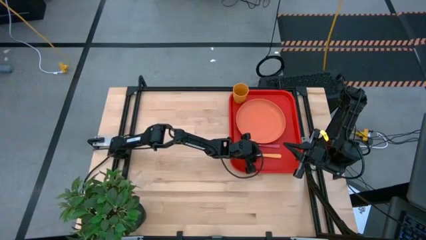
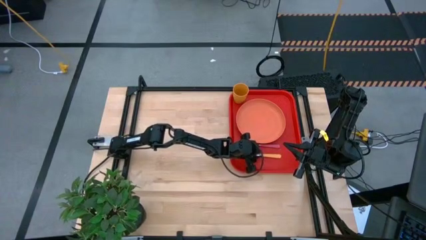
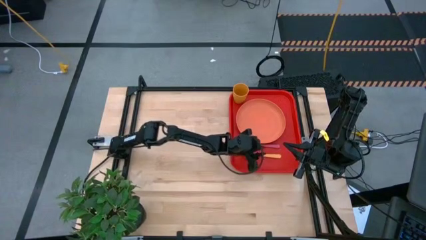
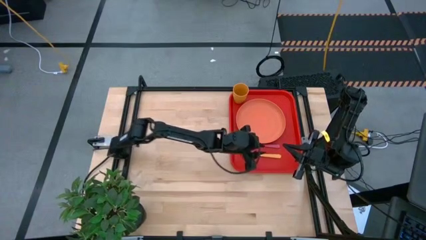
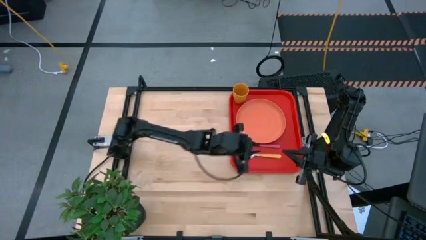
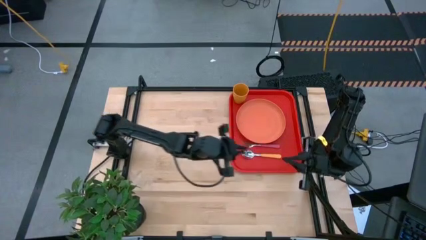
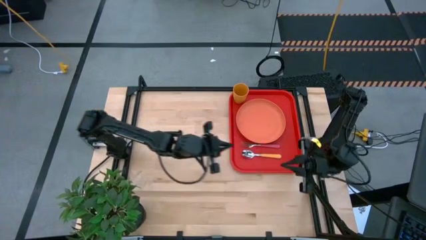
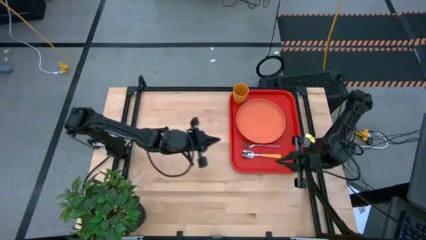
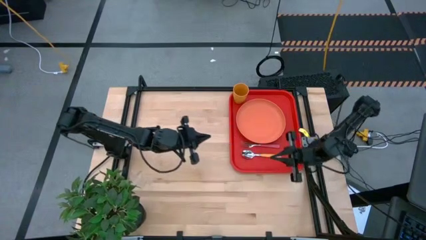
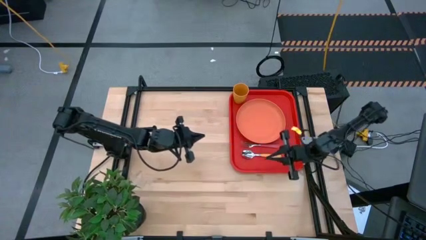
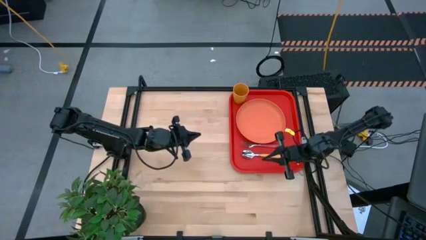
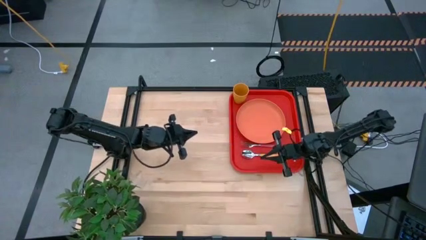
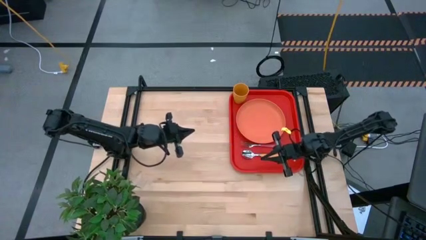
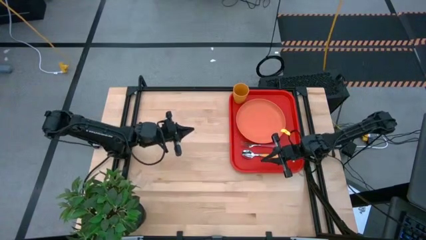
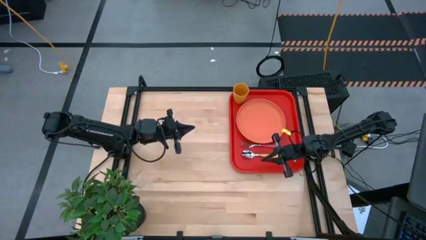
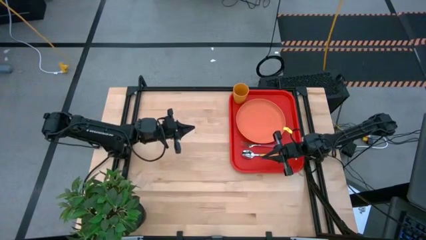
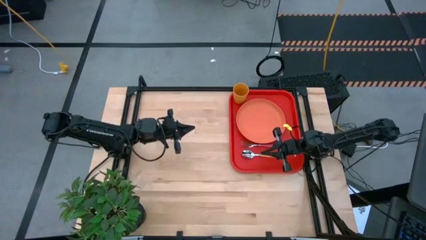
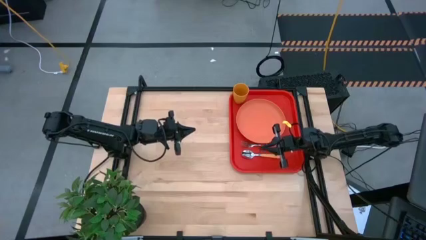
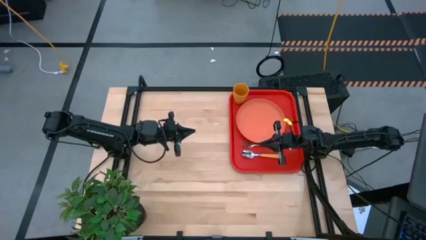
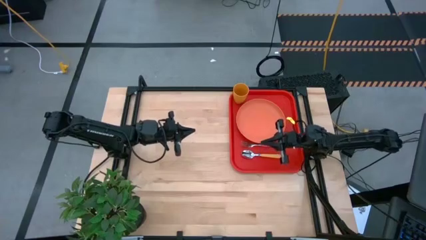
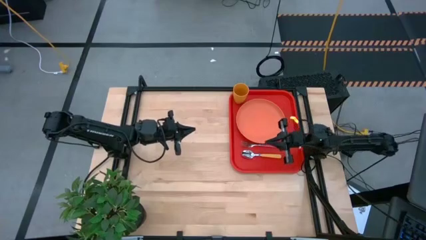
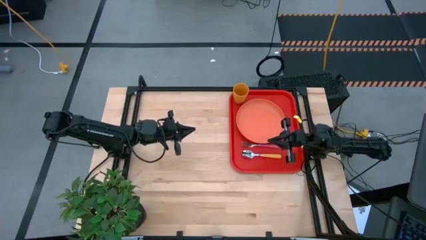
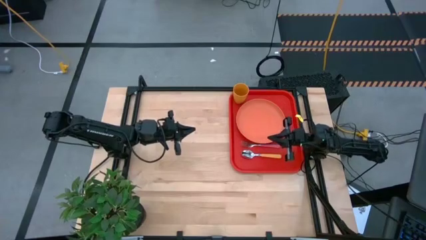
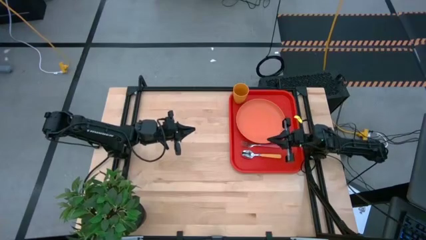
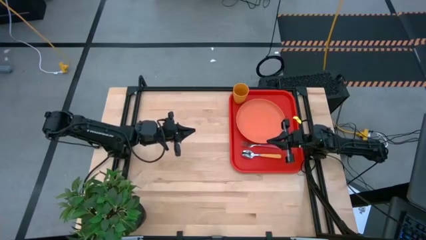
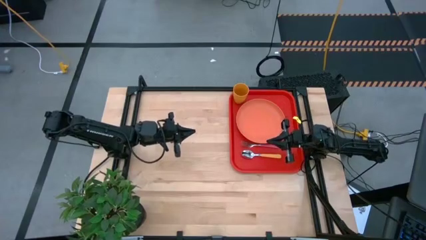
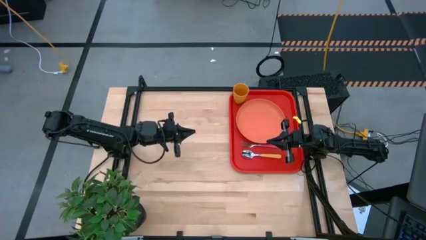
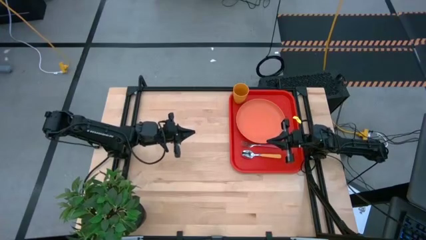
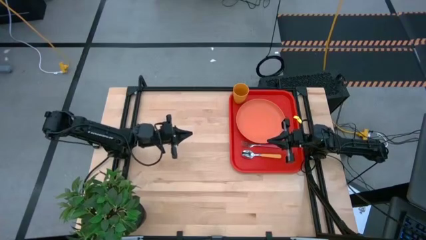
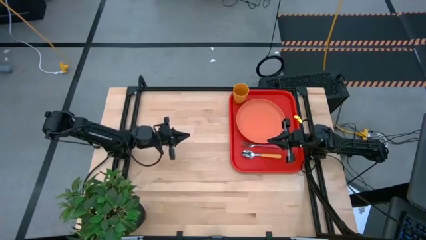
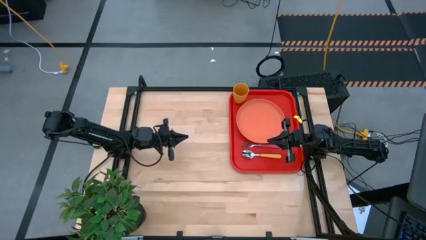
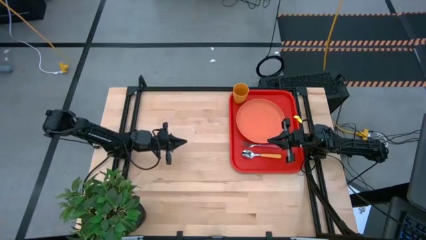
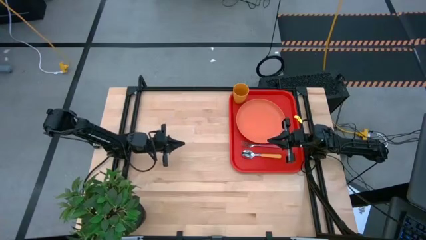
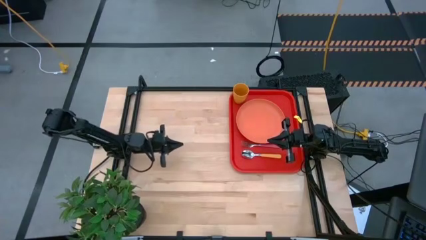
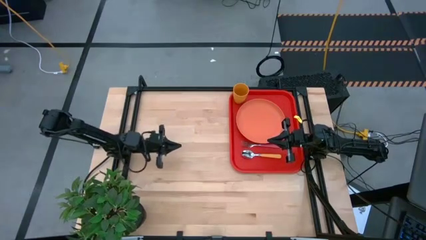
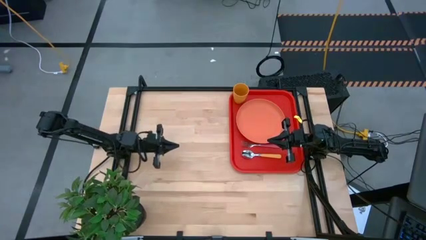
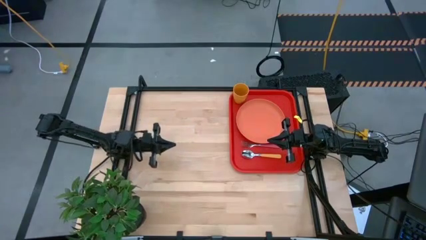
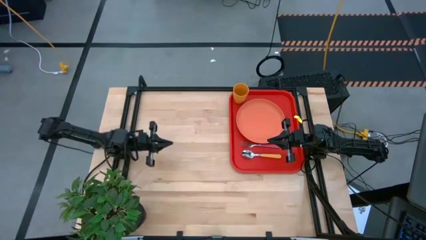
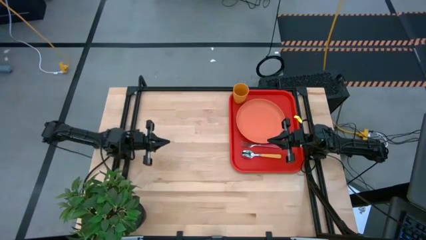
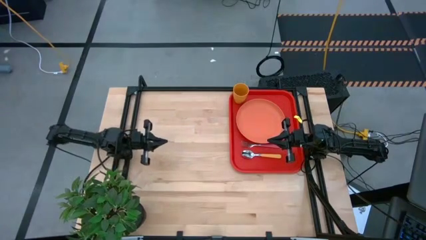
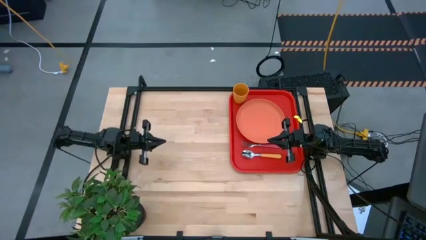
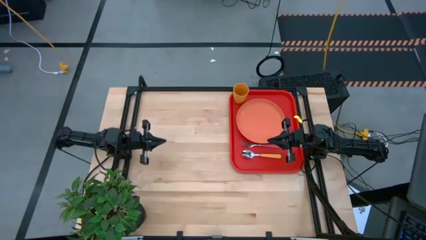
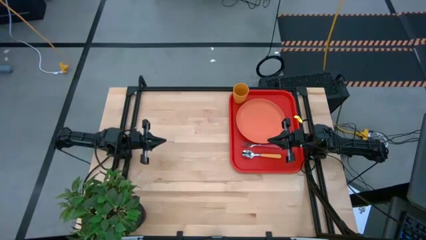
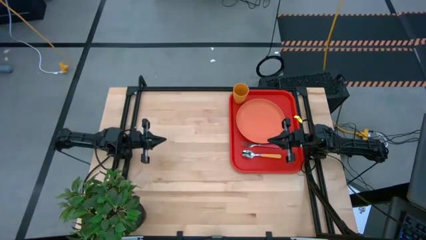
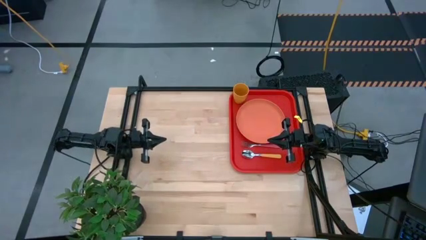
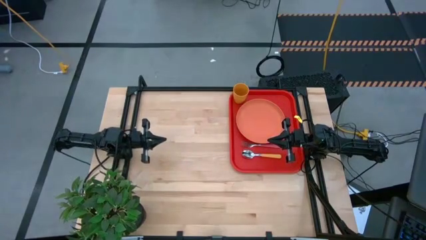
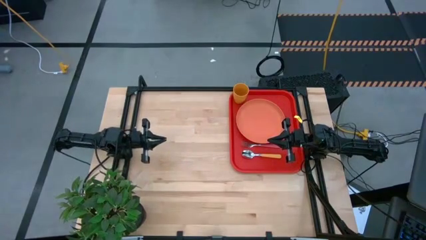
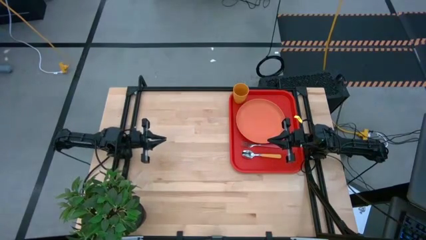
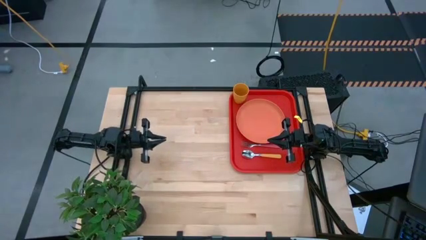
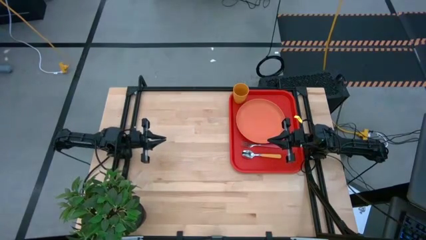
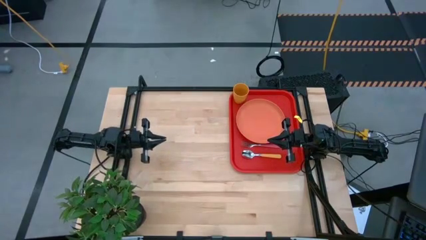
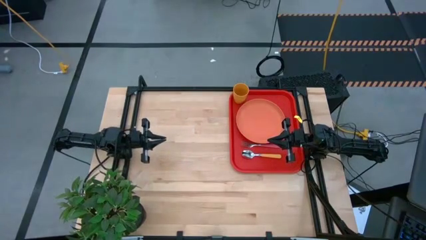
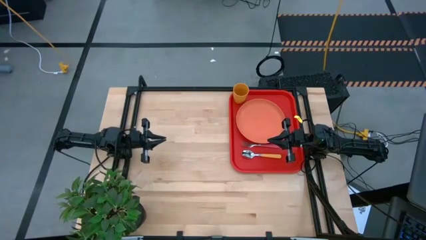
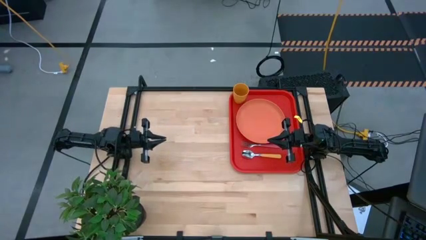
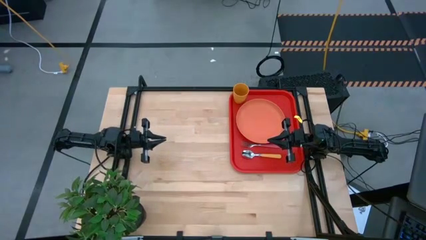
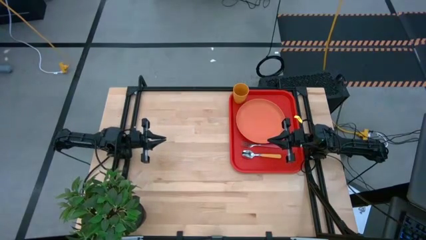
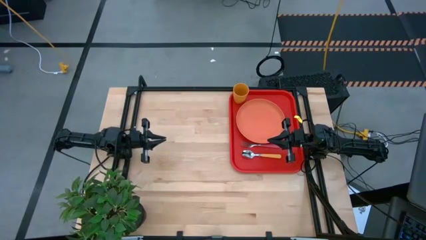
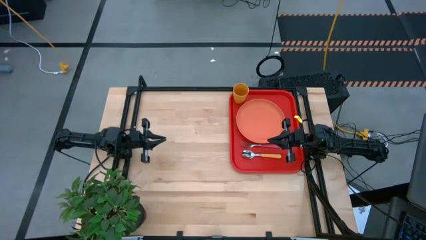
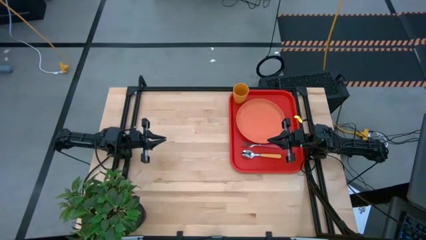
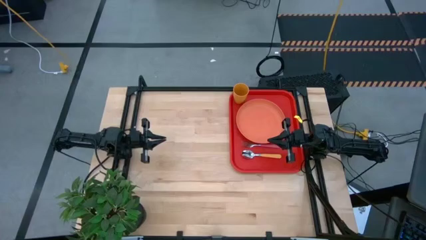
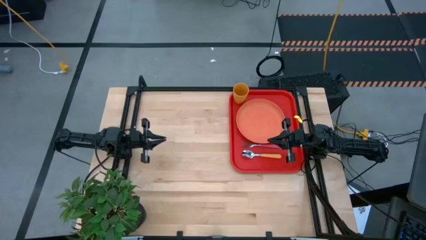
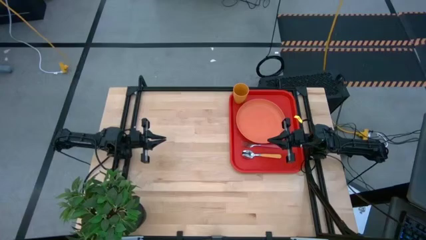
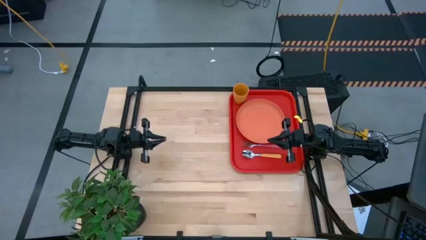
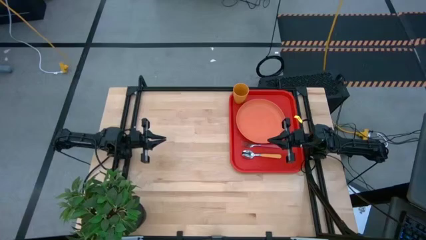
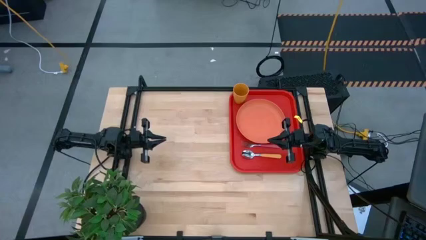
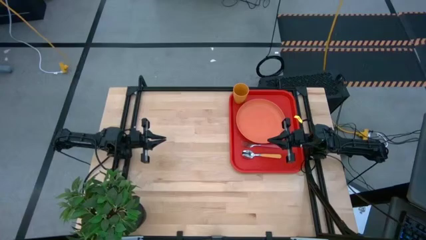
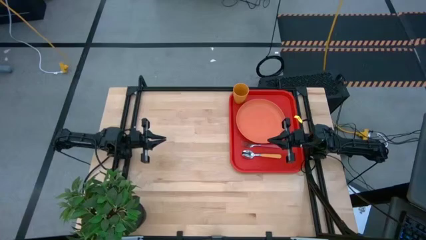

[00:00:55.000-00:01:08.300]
Task: Pick and place plate/cup/fork/spoon on tray
Return to Home Position

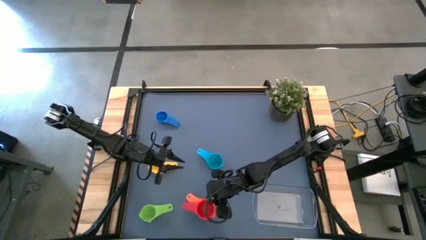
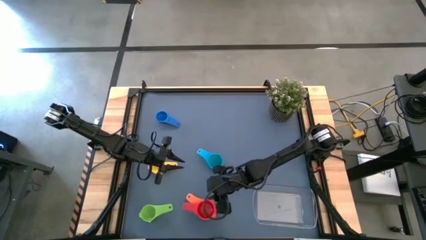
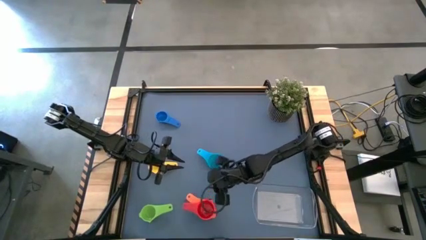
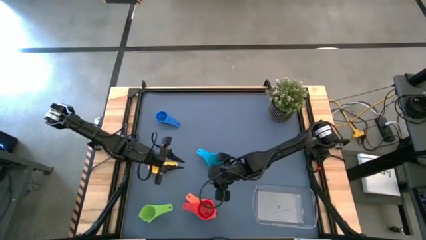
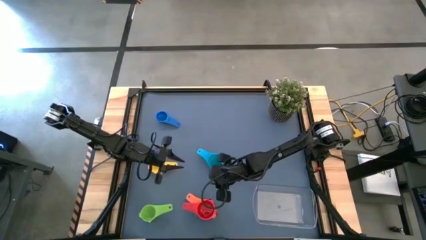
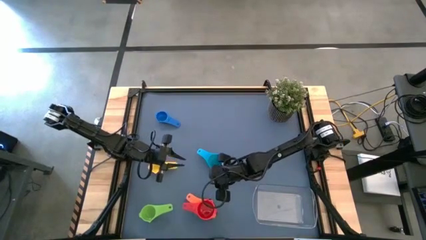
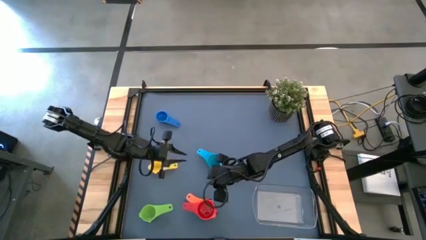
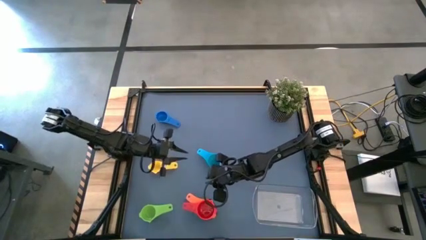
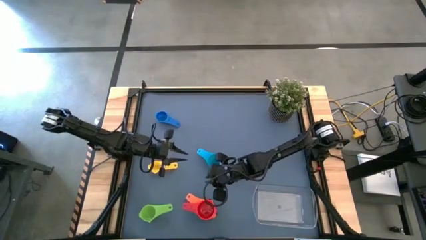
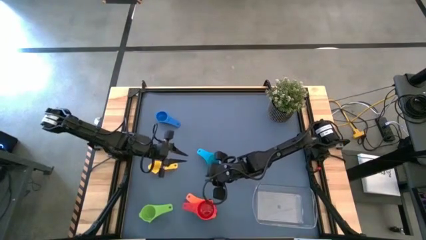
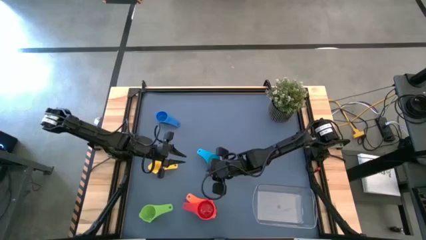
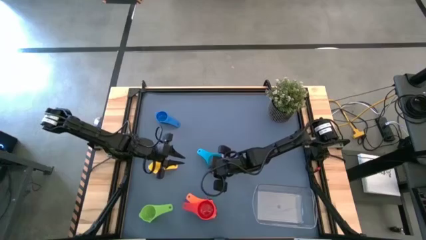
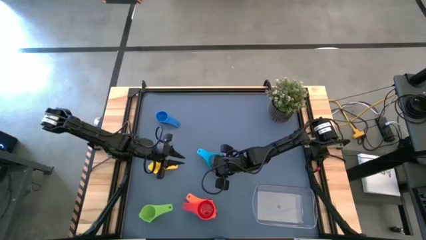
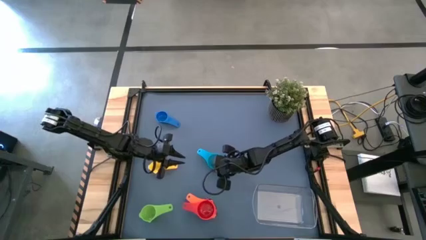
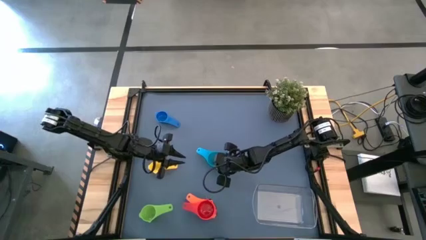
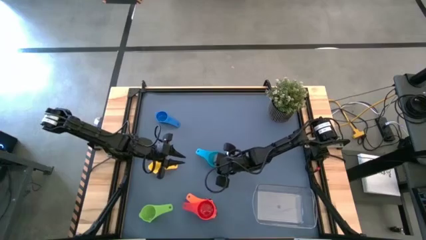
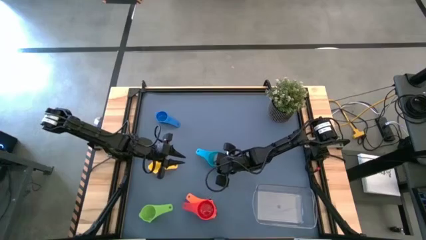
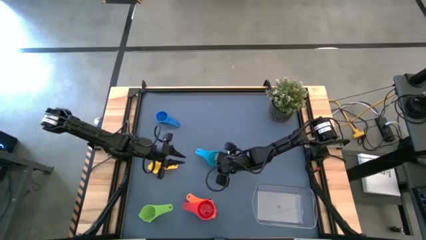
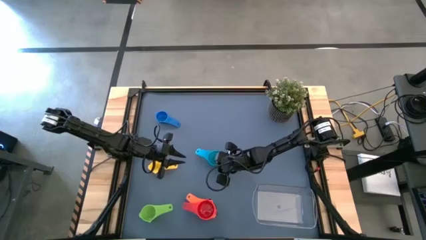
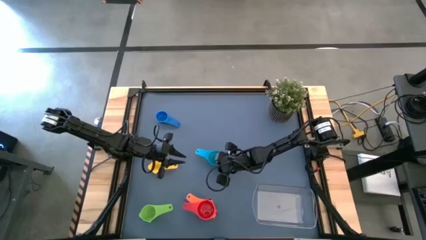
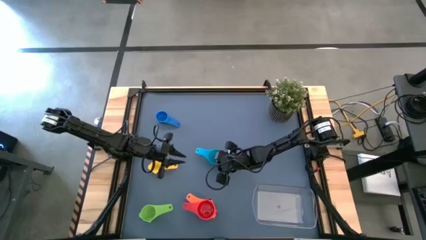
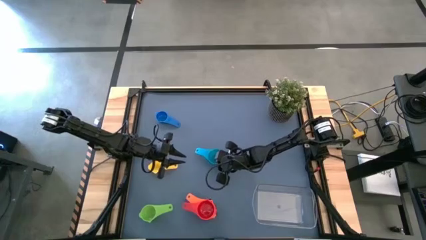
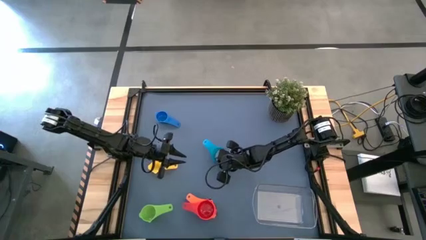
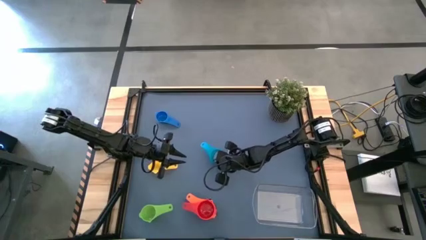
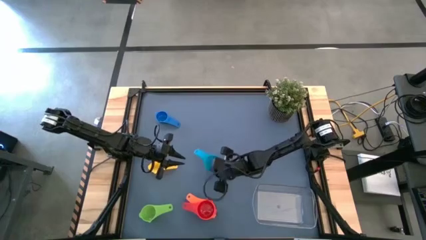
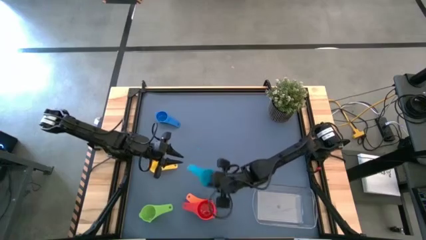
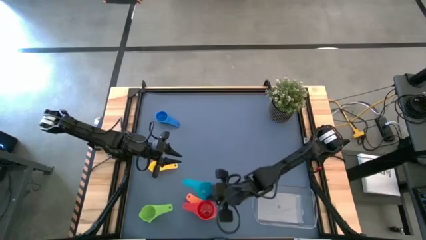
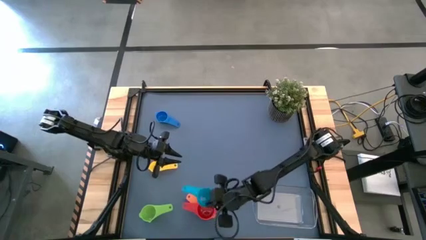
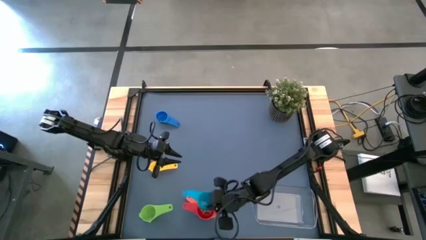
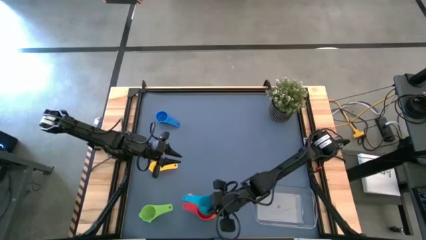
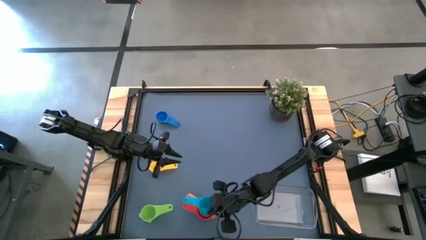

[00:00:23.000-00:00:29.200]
Task: Nest measuring cups in basket
Stack the light blue measuring cup on top of the red measuring cup
